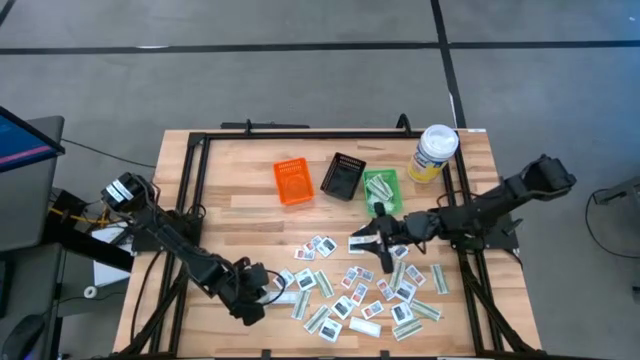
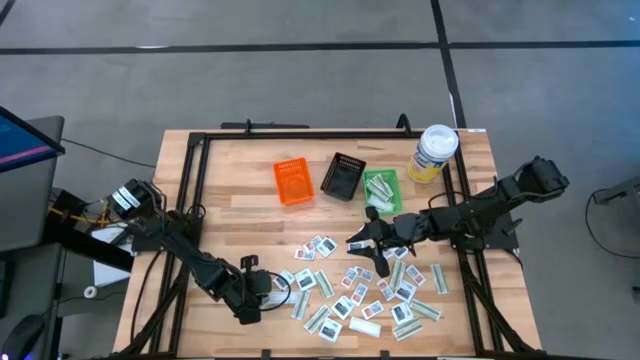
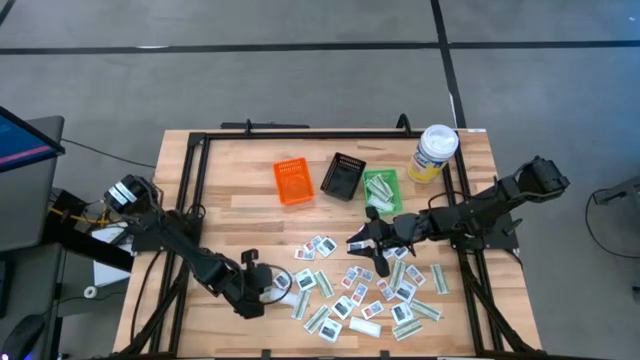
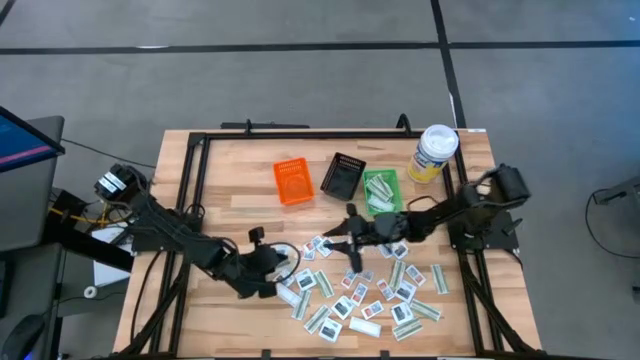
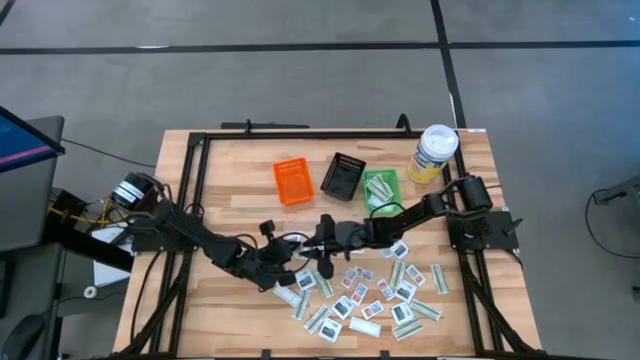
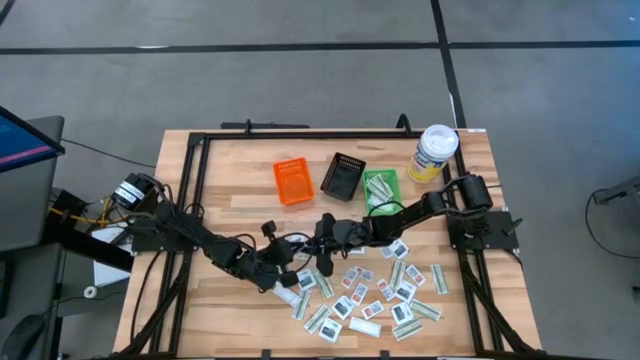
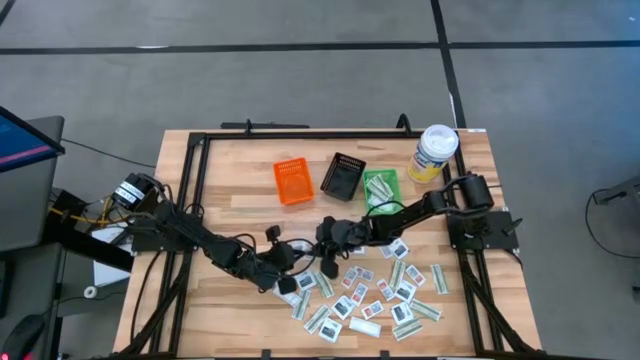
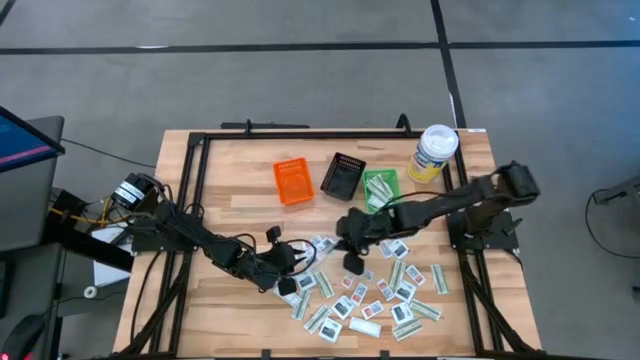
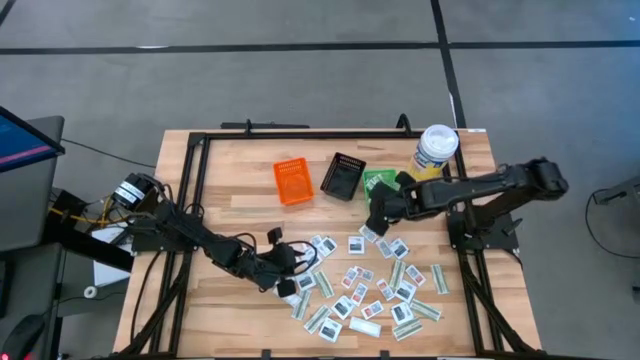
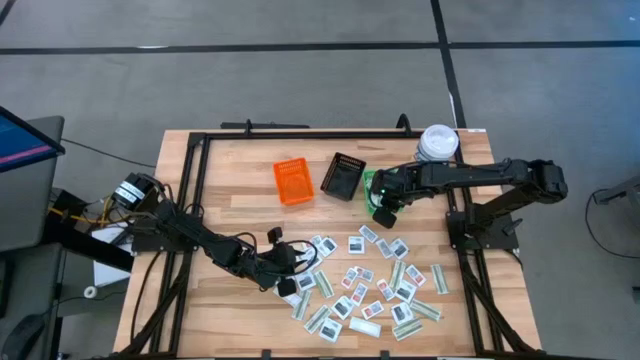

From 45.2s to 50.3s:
Task: Pick & Place First Aid Supplies
Put the green bandage pack into the green basket

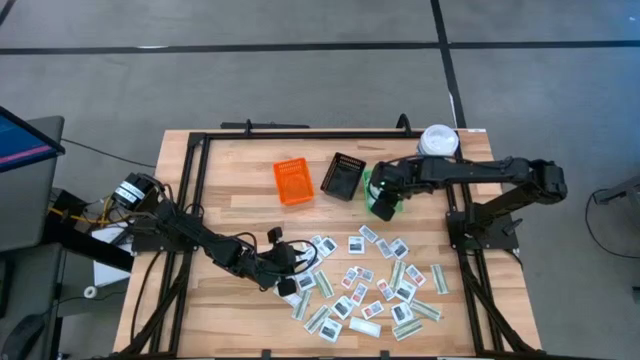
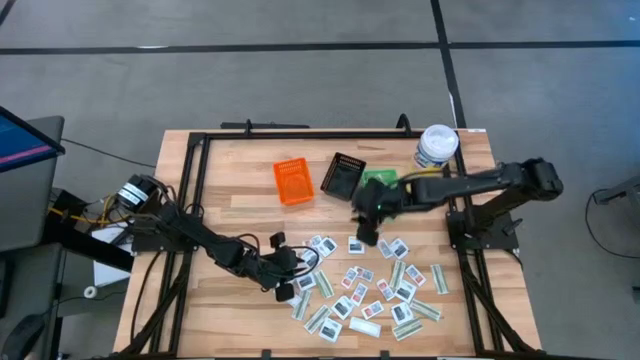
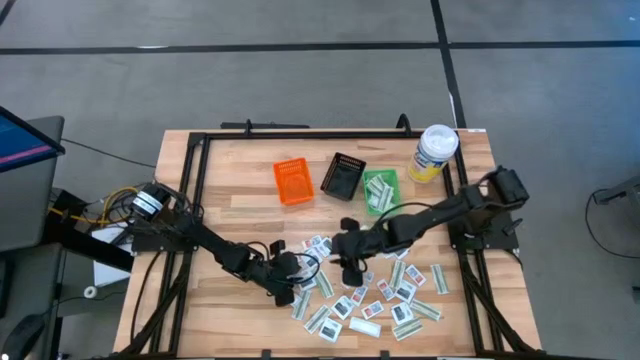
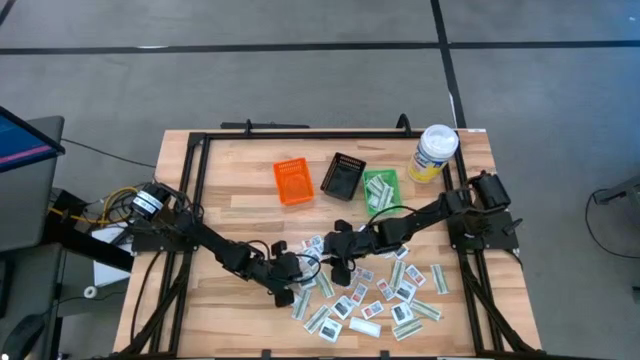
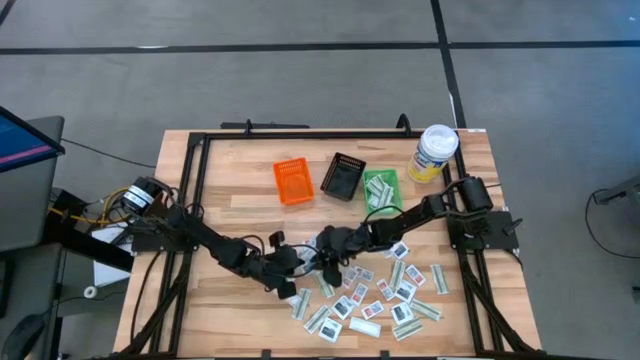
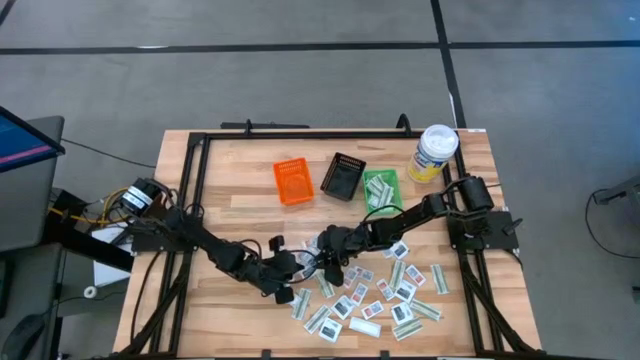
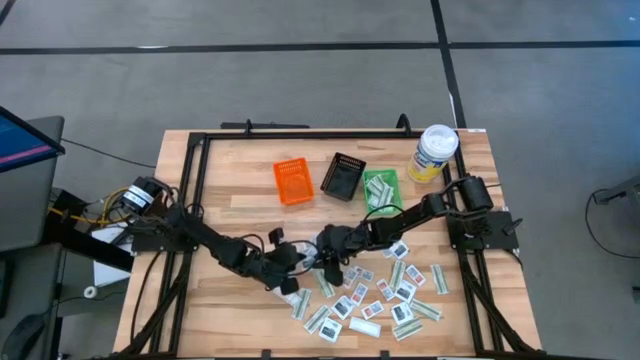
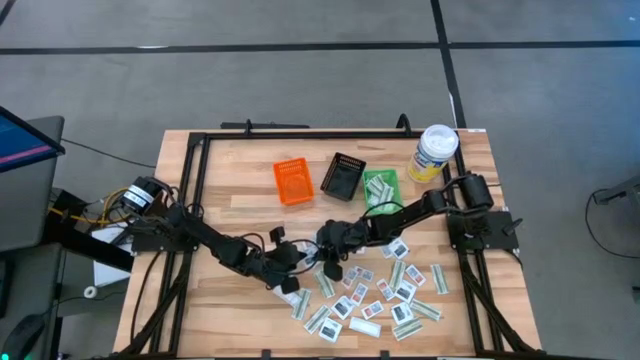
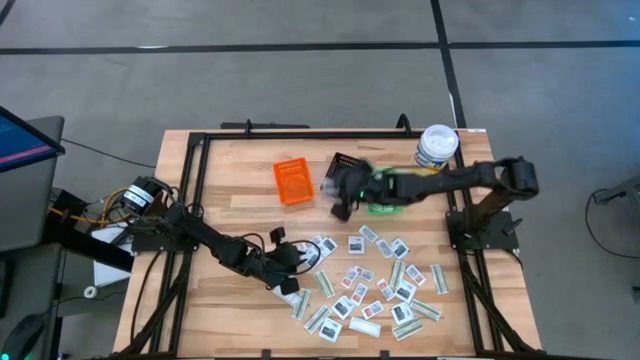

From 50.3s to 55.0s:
Put the black towelette pack into the black basket

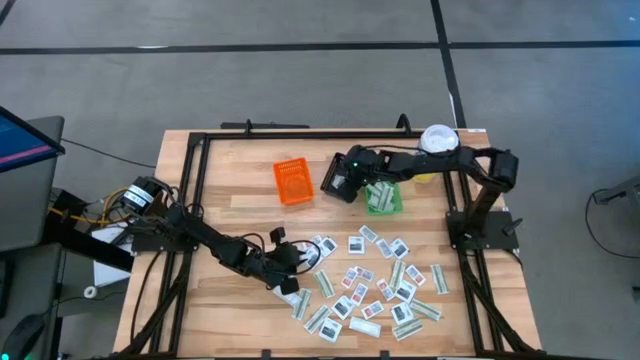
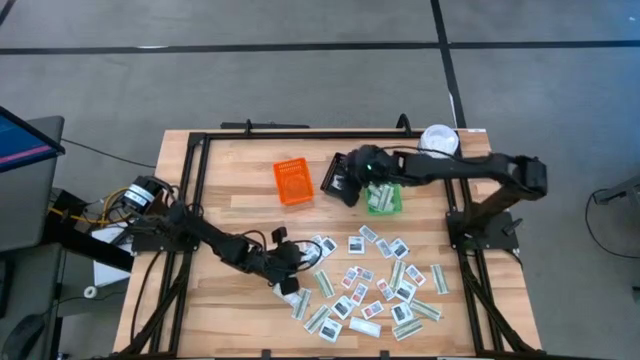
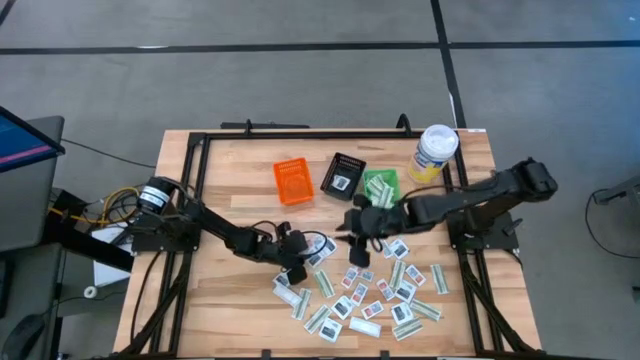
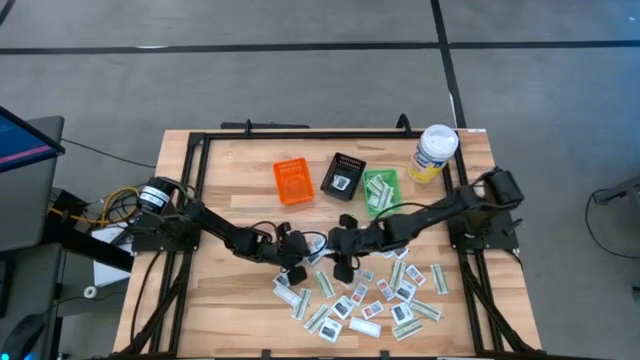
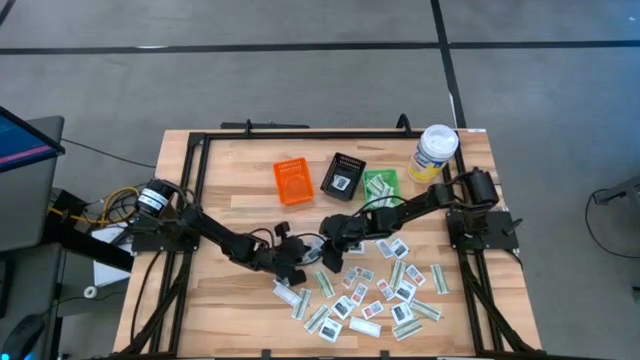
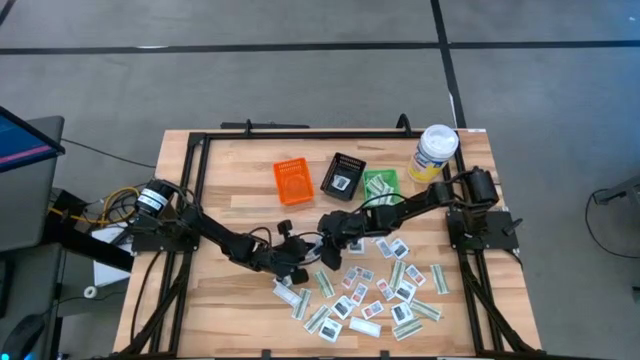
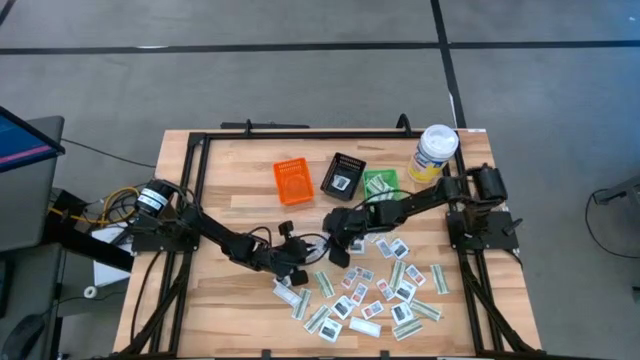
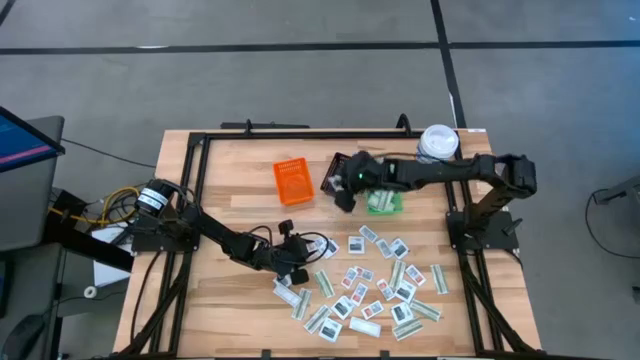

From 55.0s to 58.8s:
Put the black towelette pack into the black basket

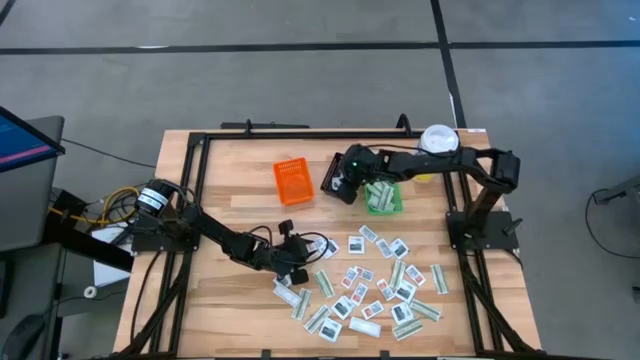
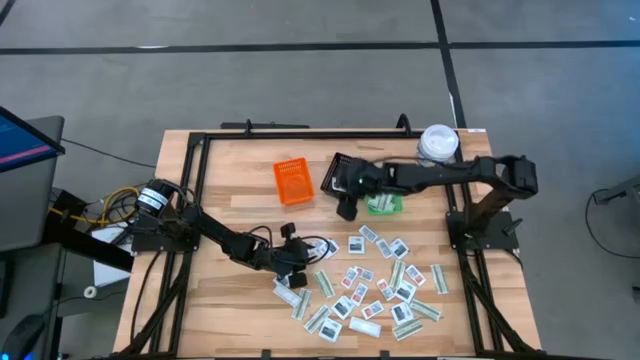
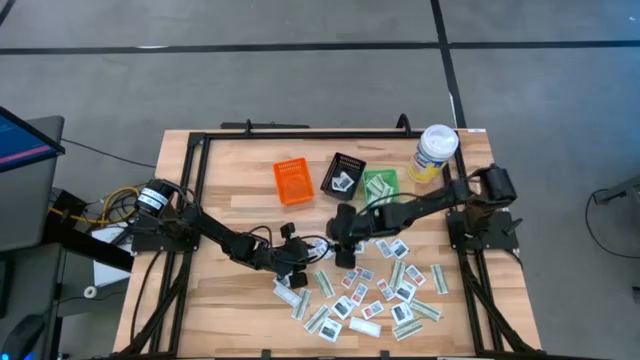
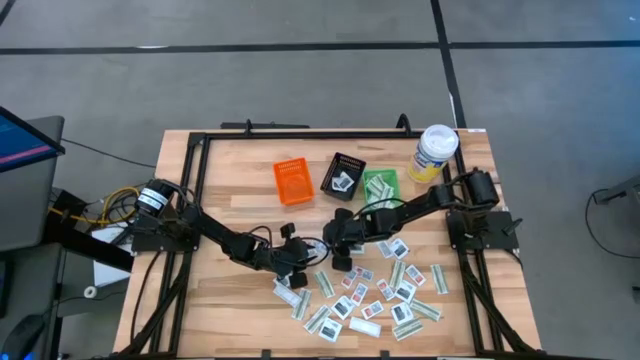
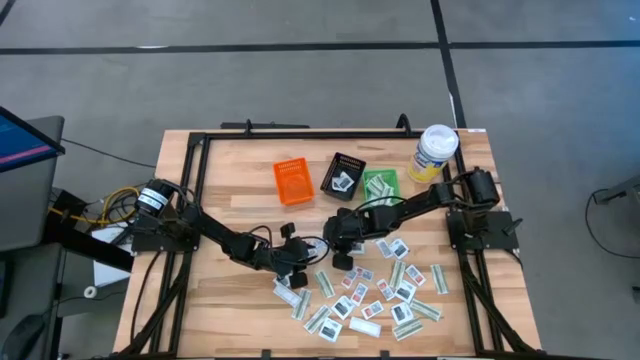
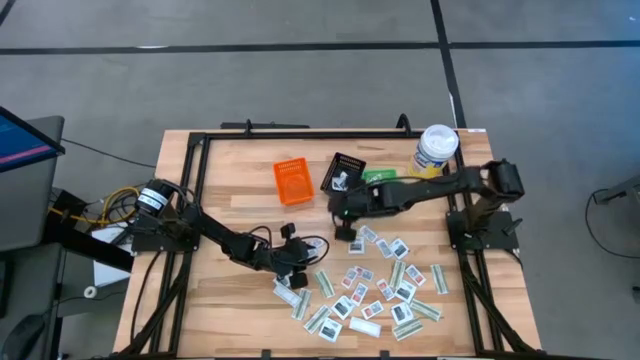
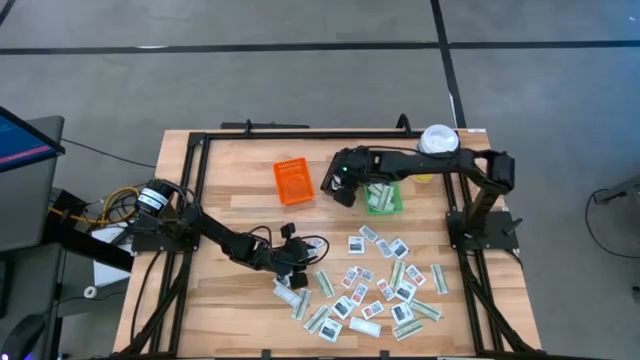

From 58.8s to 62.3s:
Put the black towelette pack into the black basket

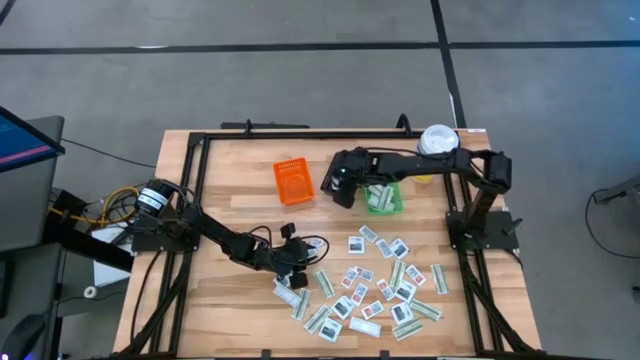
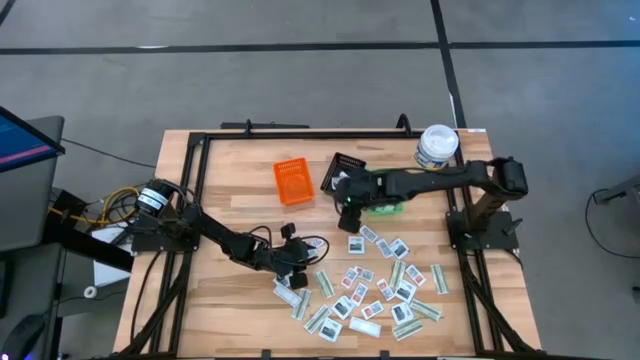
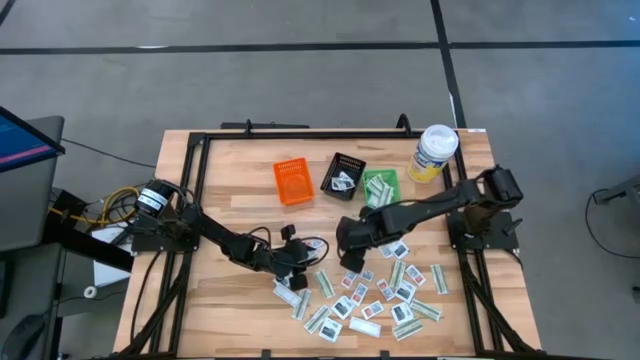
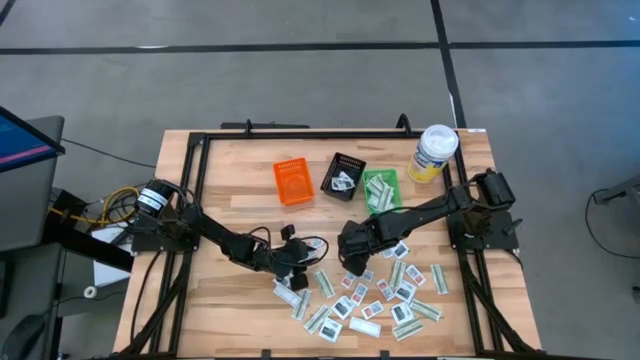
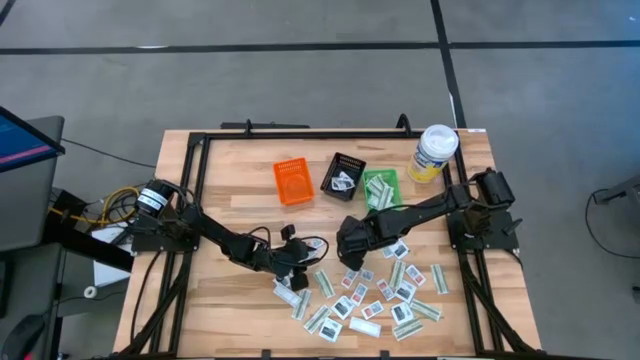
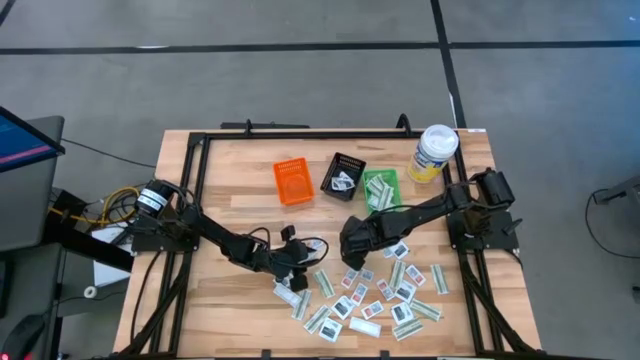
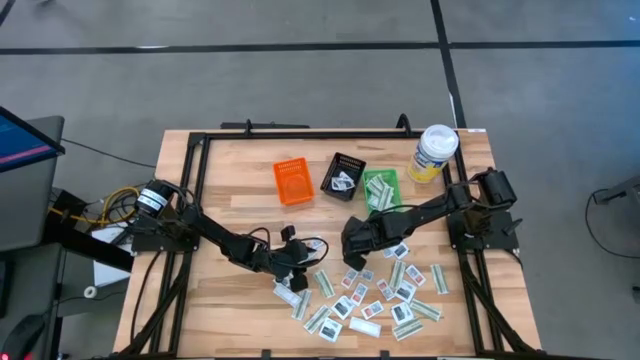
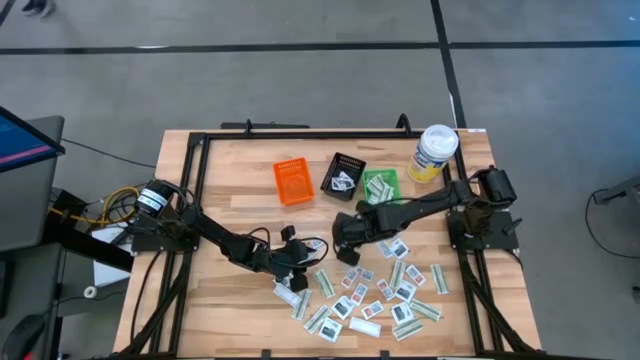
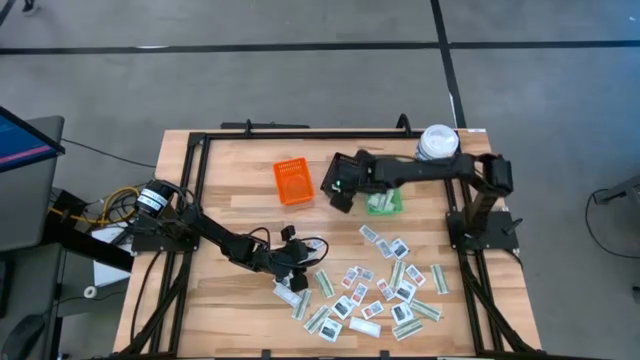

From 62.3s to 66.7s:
Put the black towelette pack into the black basket
